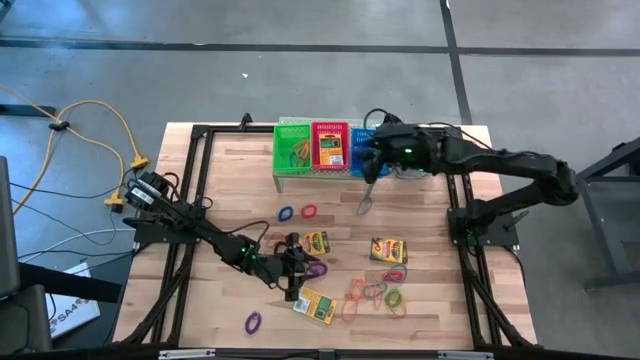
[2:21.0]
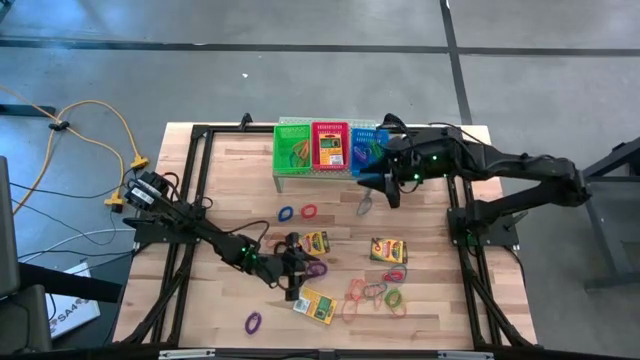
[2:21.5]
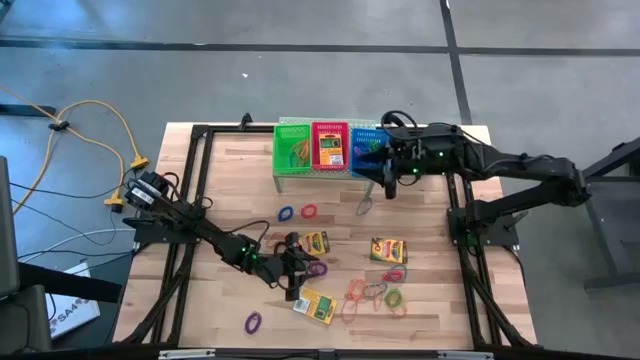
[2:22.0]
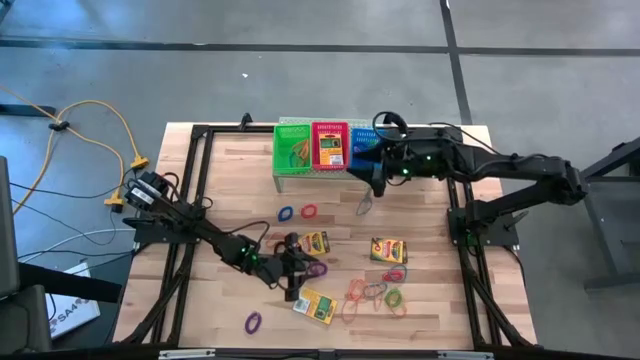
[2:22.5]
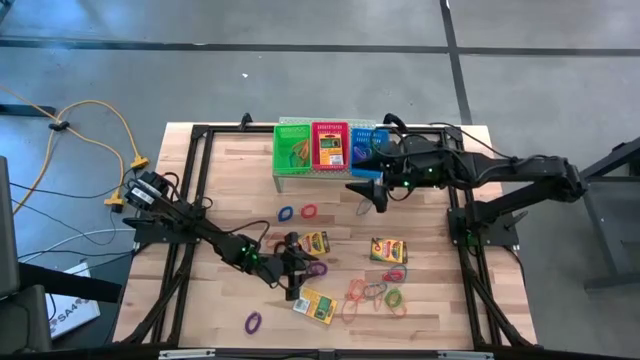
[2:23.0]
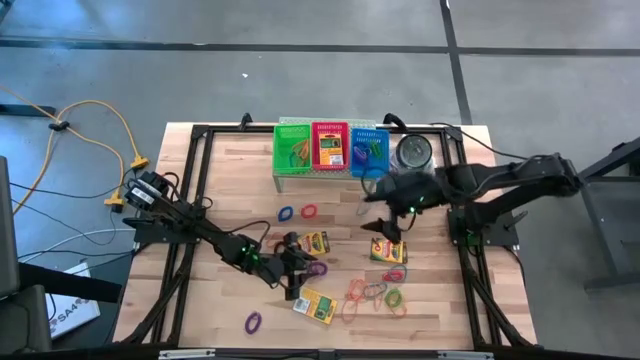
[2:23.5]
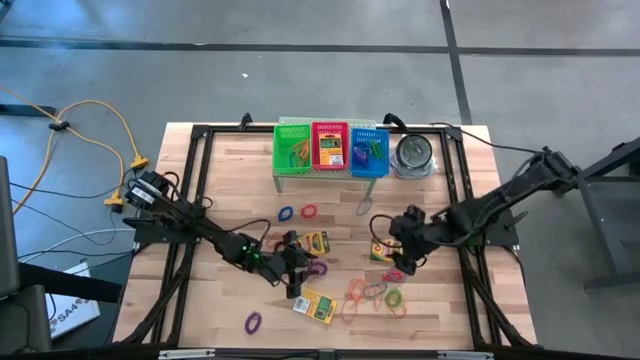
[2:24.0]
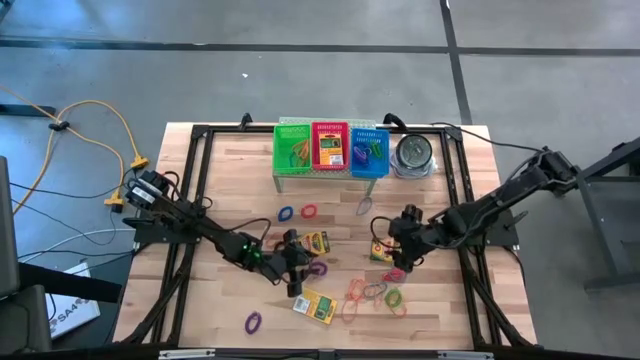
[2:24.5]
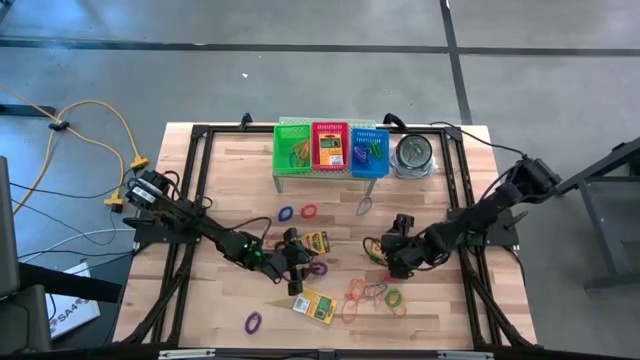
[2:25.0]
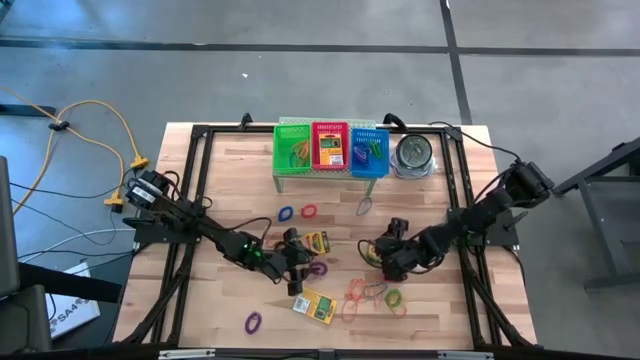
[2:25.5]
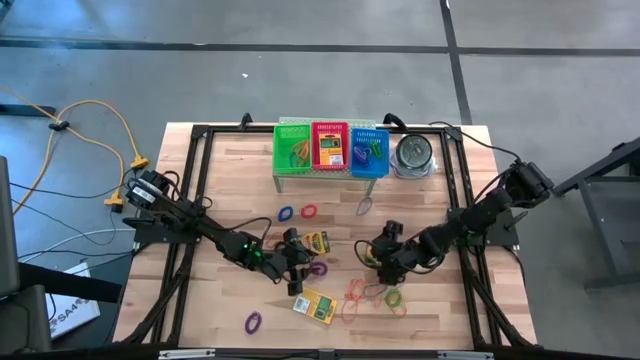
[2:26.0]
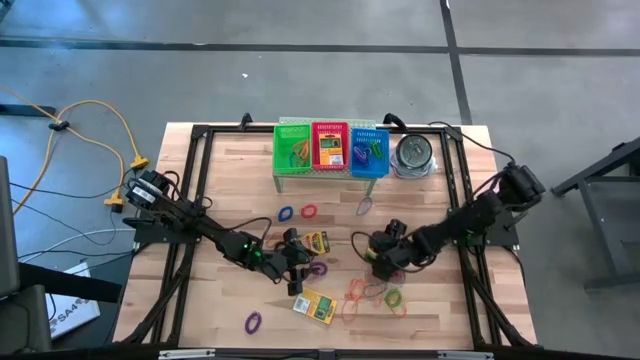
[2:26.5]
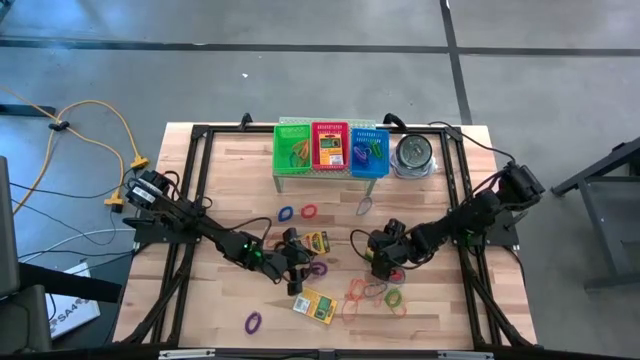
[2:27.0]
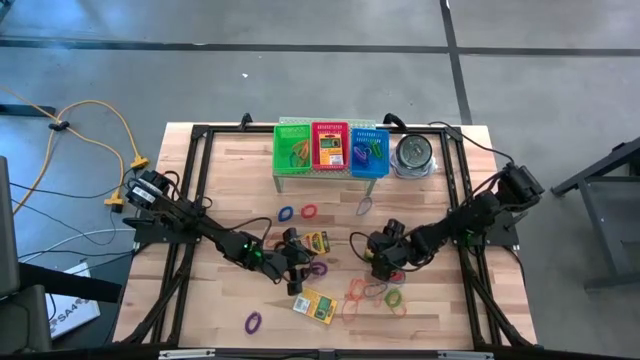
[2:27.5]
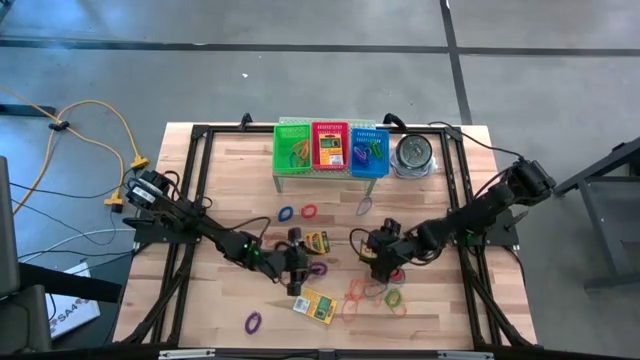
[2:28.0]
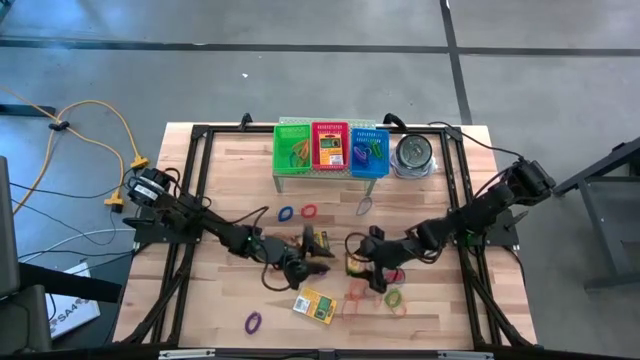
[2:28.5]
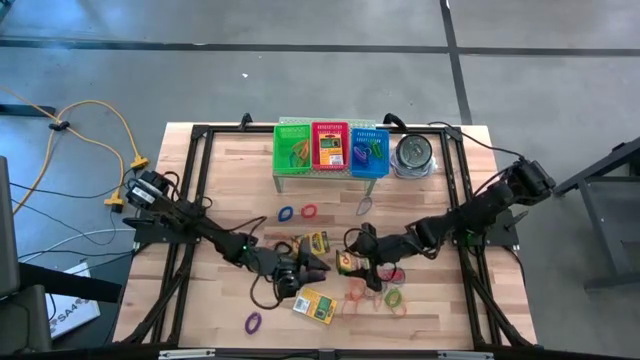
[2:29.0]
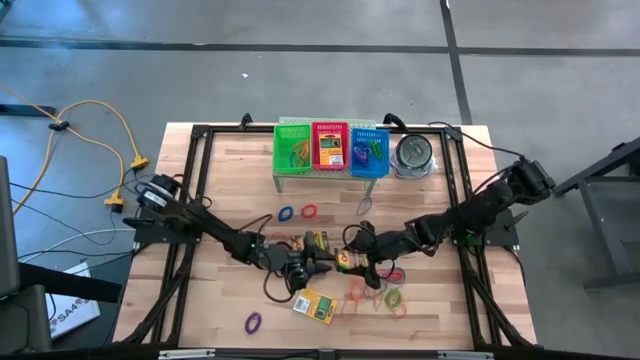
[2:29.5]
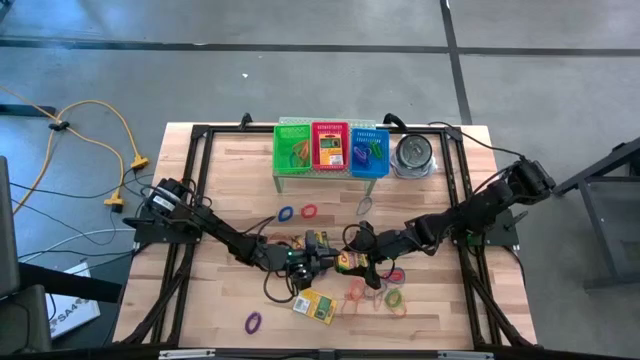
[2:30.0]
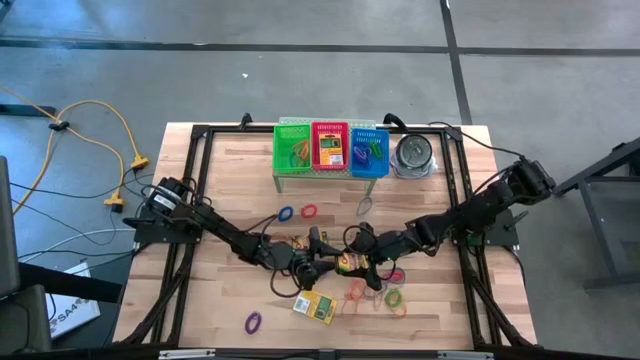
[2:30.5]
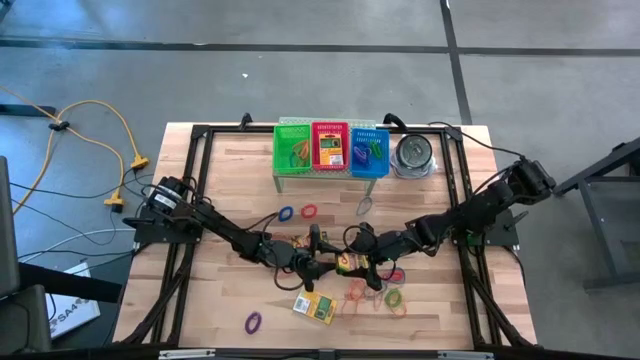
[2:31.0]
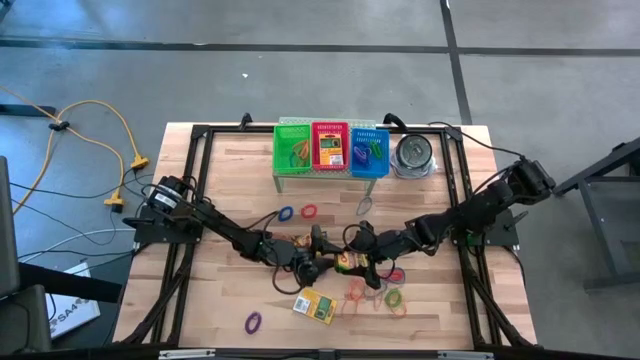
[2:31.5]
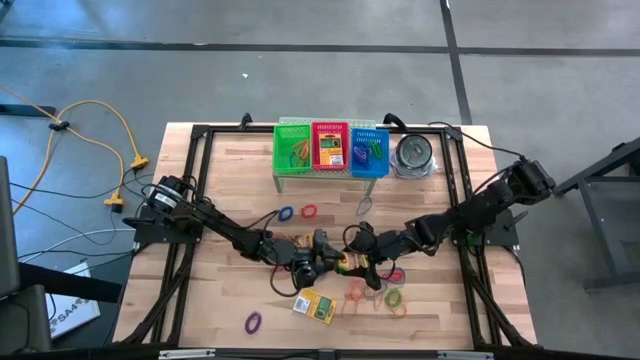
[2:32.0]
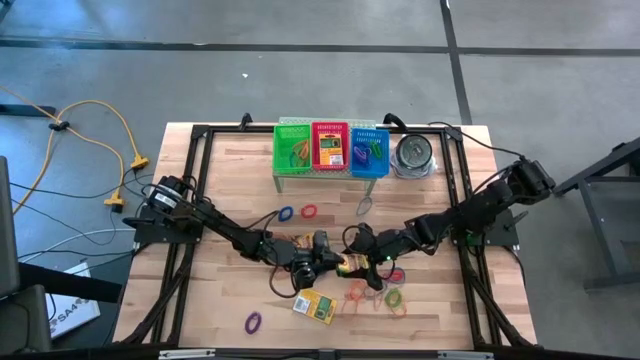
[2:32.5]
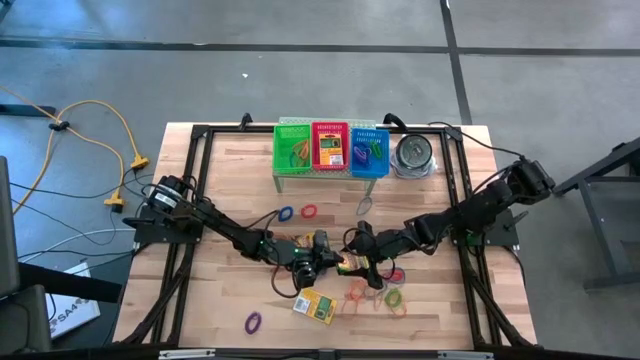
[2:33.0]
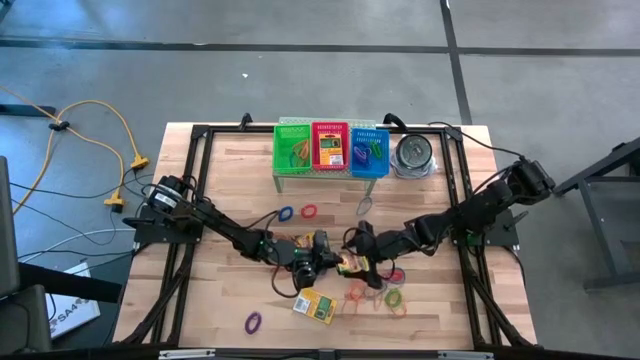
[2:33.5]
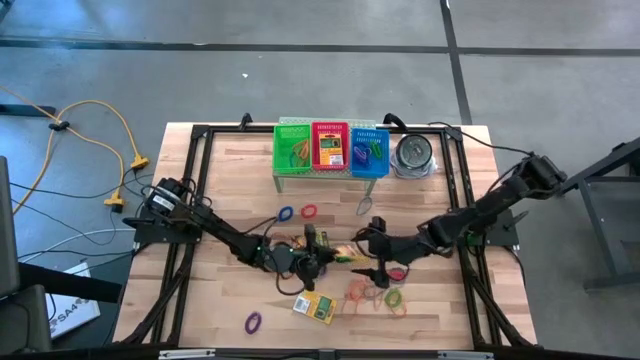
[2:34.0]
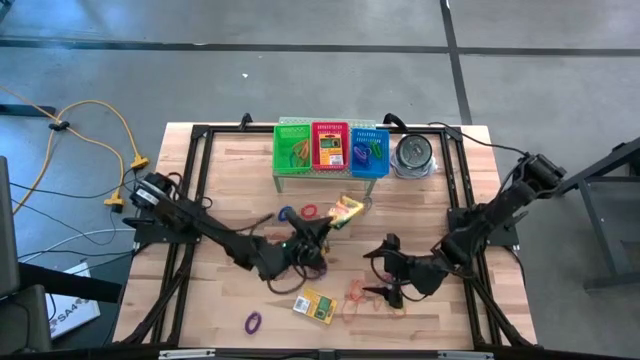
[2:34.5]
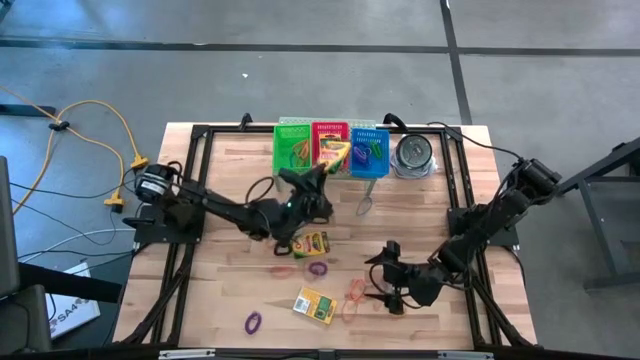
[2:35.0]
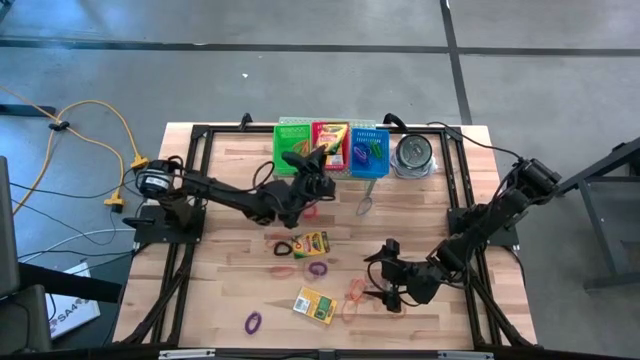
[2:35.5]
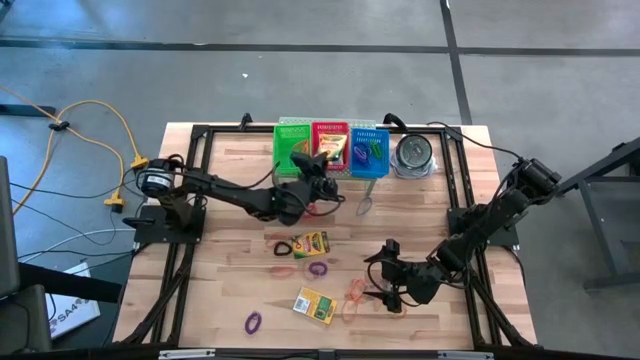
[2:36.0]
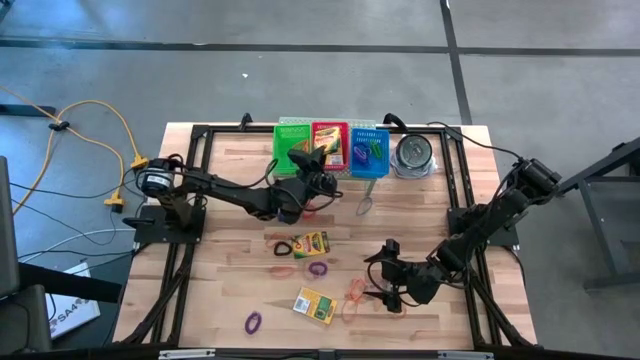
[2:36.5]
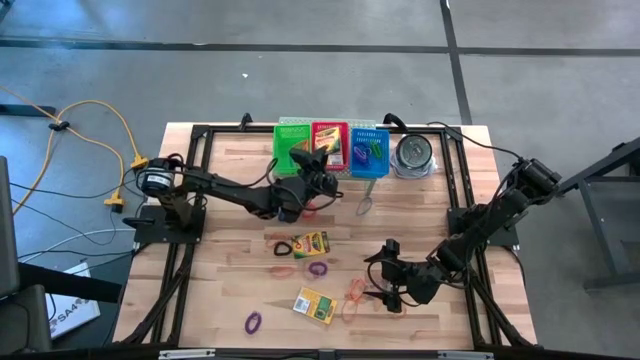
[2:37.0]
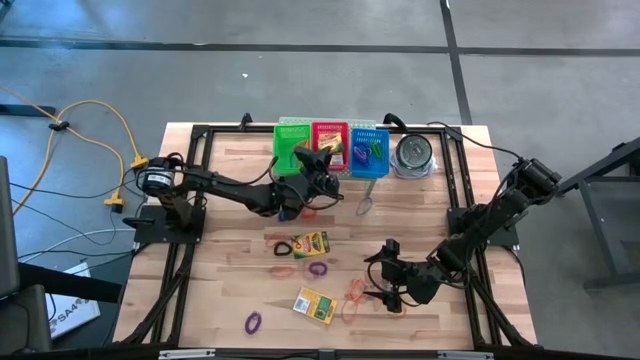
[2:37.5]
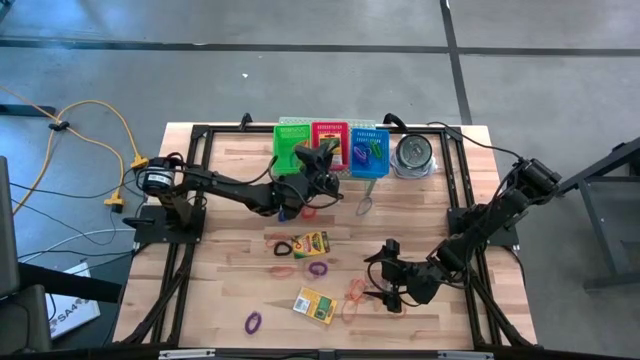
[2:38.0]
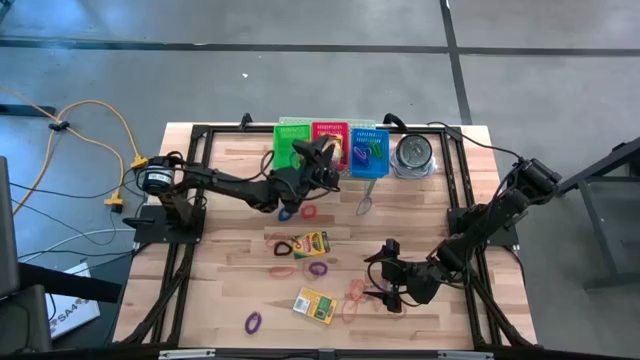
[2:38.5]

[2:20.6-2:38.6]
Task: Pick & Place Office Desk Supplies
Put the top right yellow crayon box into the red bin on the shelf

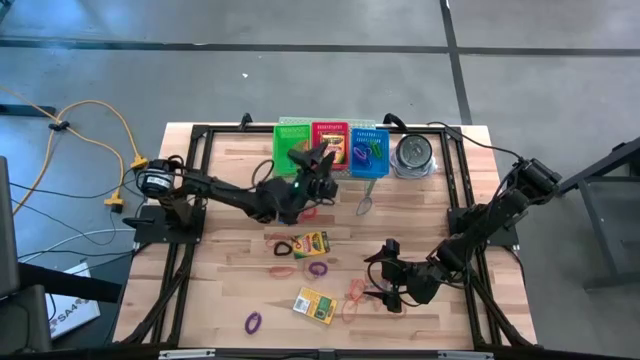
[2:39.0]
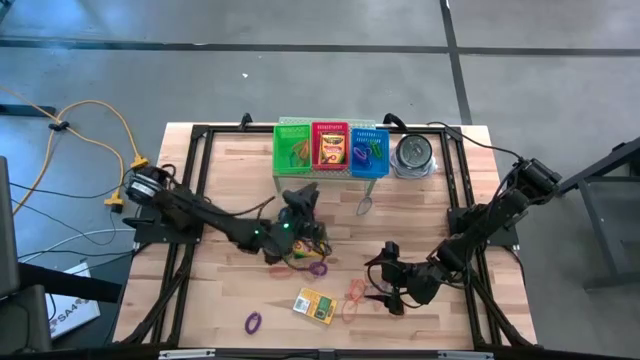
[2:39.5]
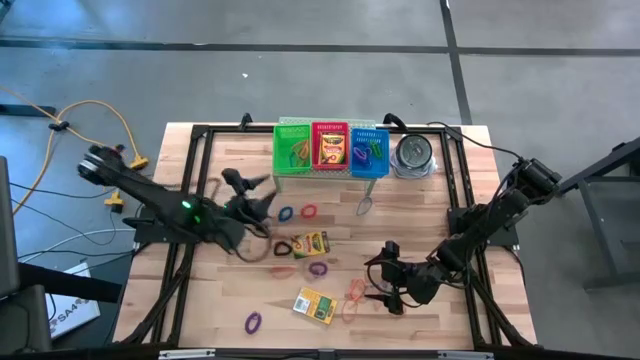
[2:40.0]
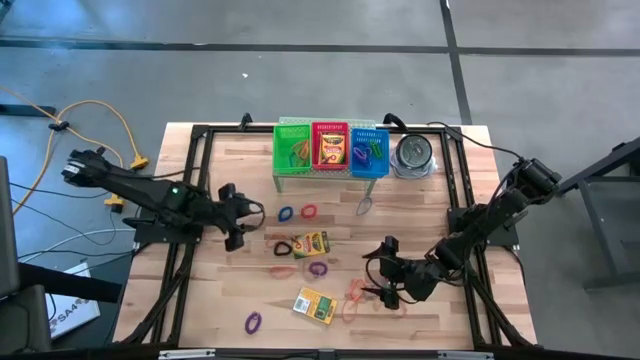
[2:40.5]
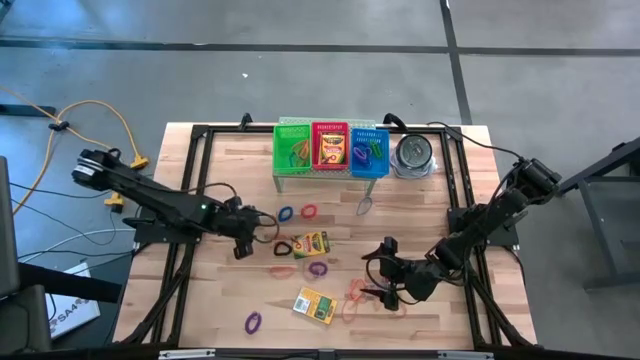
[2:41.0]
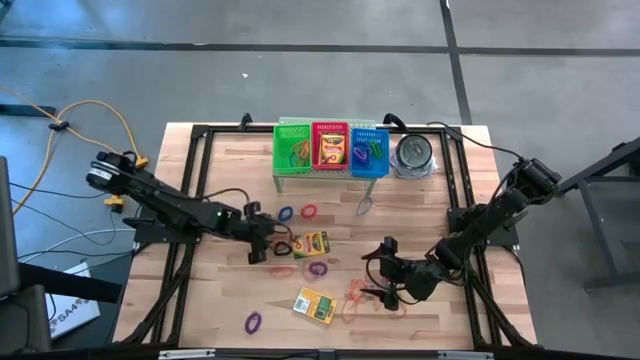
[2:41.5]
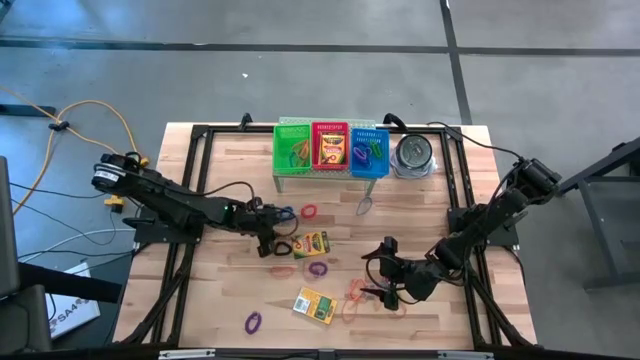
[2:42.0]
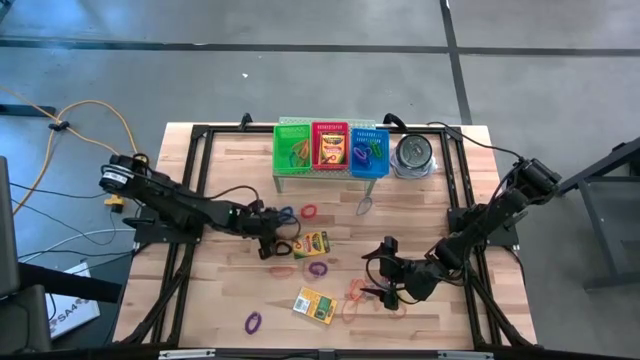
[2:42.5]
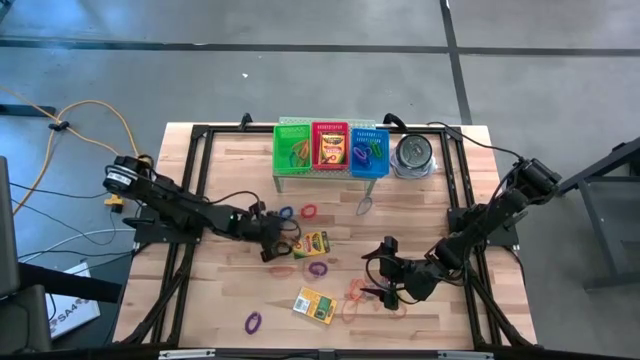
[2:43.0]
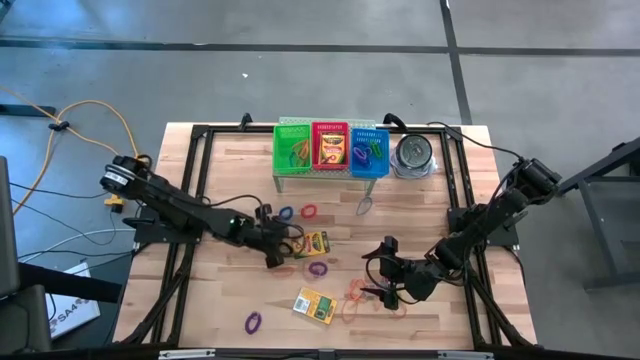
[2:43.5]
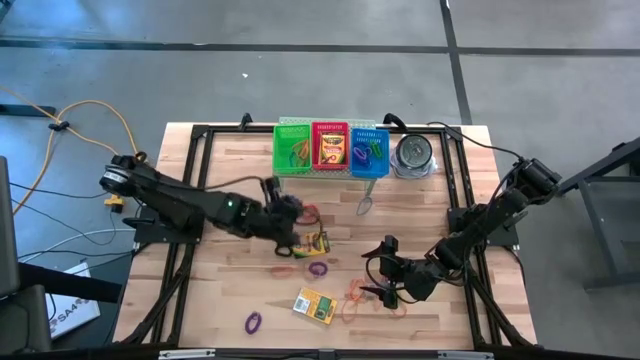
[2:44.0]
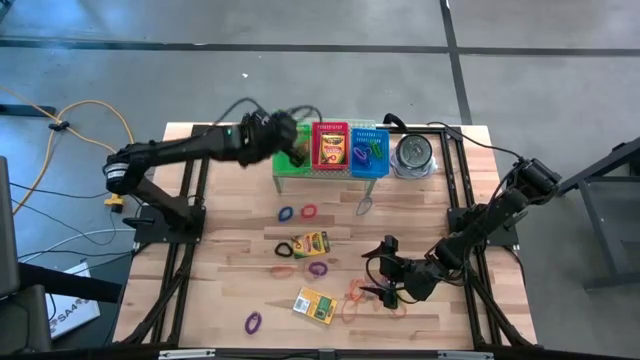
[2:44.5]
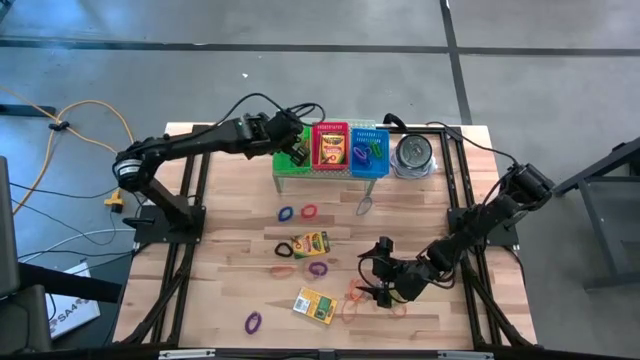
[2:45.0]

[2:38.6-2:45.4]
Put the orange rubber band into the green bin on the shelf
